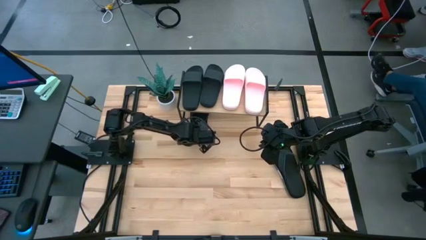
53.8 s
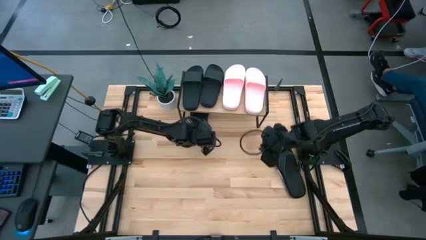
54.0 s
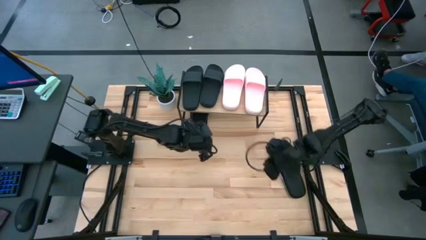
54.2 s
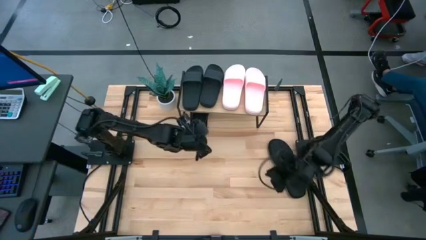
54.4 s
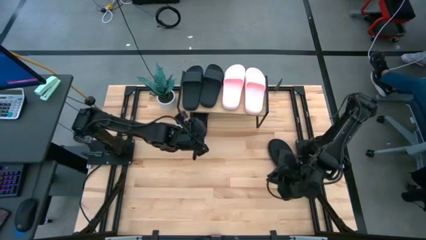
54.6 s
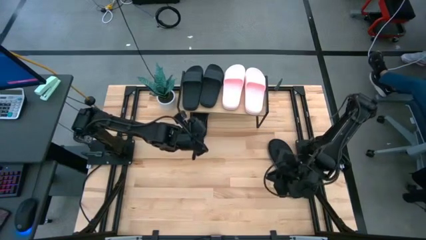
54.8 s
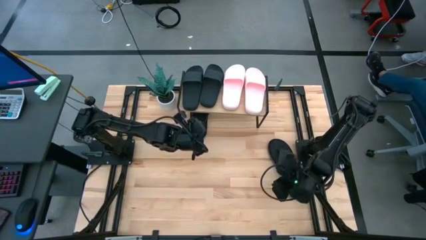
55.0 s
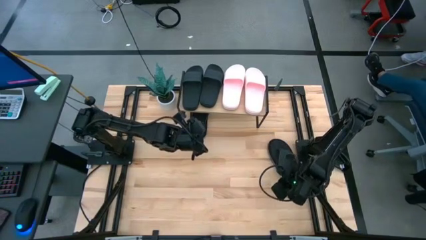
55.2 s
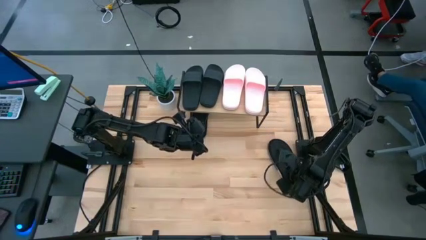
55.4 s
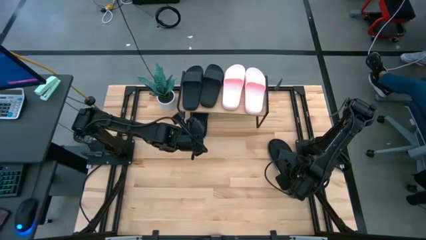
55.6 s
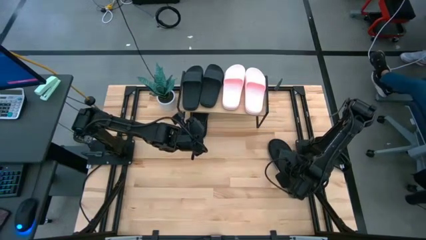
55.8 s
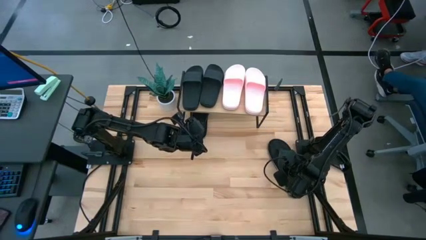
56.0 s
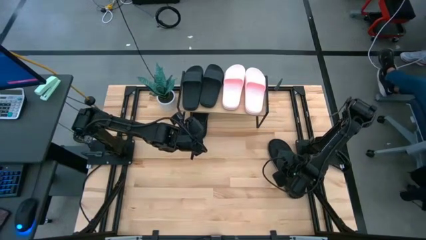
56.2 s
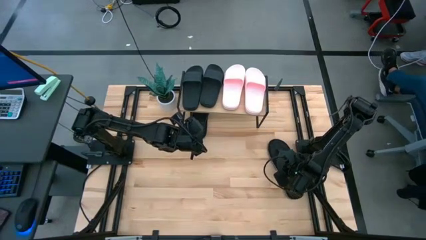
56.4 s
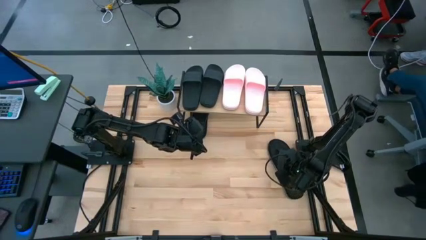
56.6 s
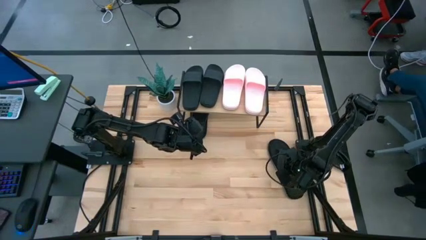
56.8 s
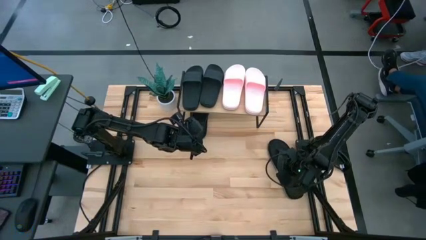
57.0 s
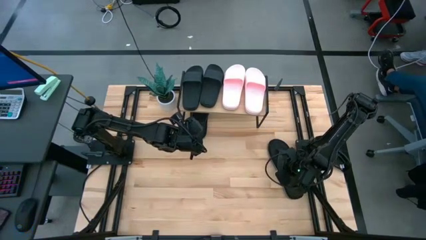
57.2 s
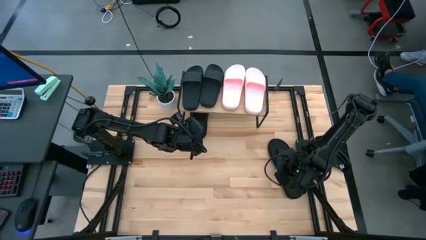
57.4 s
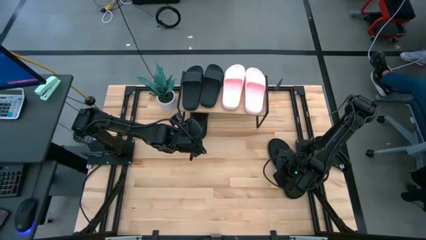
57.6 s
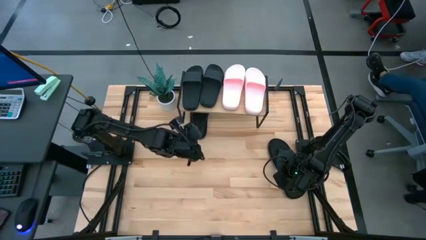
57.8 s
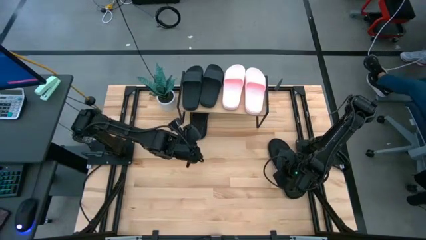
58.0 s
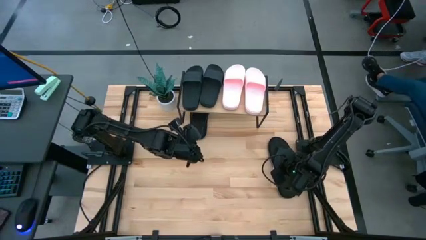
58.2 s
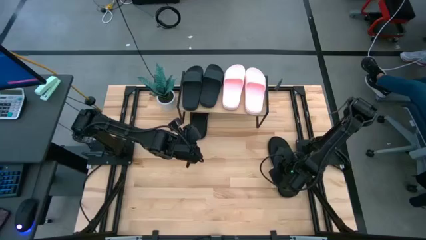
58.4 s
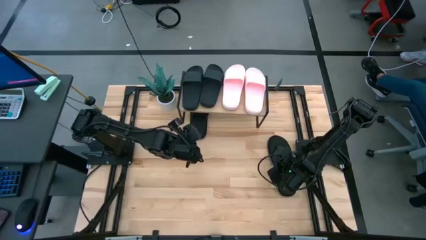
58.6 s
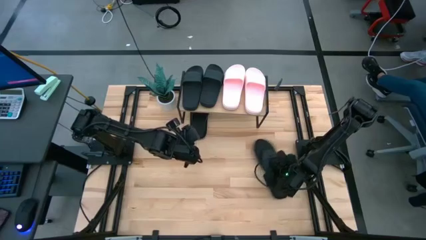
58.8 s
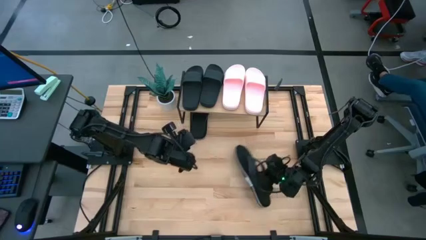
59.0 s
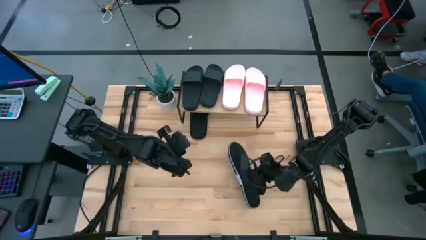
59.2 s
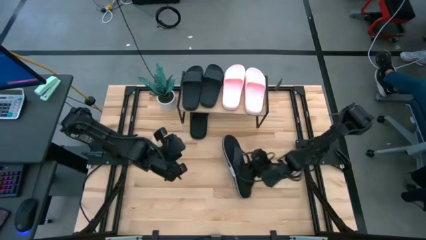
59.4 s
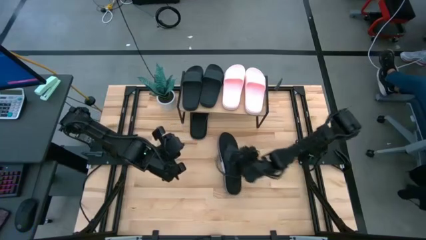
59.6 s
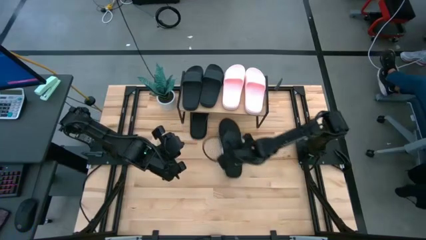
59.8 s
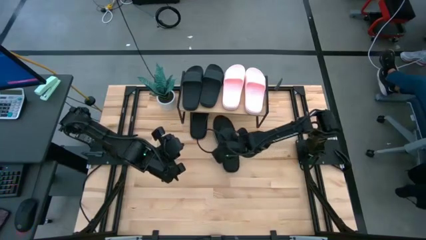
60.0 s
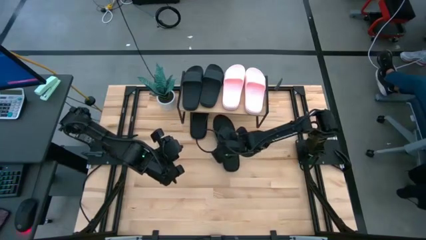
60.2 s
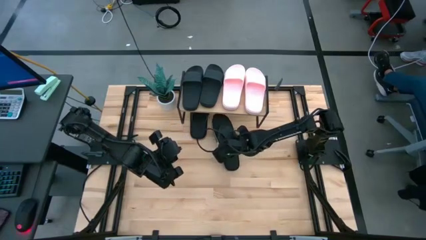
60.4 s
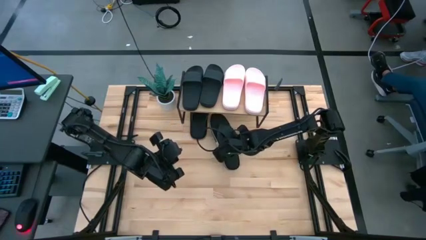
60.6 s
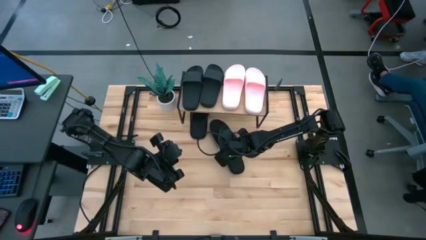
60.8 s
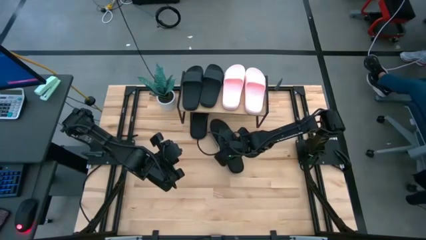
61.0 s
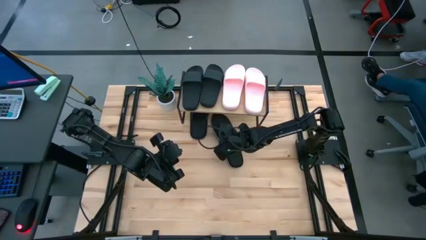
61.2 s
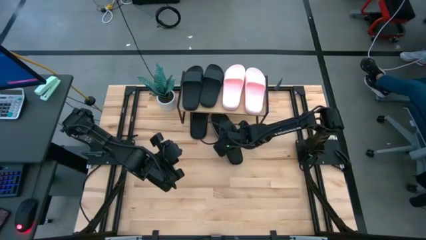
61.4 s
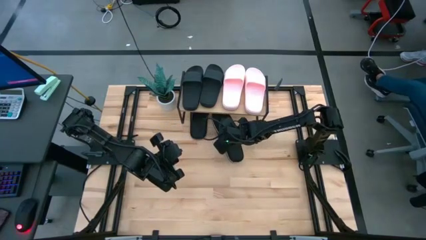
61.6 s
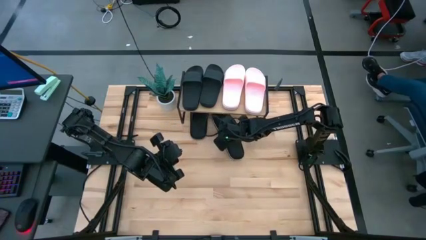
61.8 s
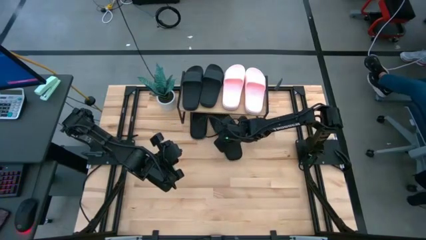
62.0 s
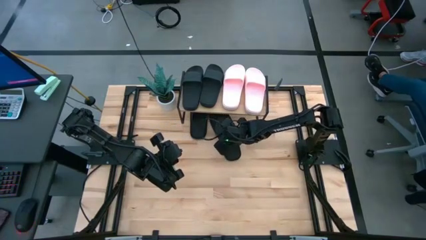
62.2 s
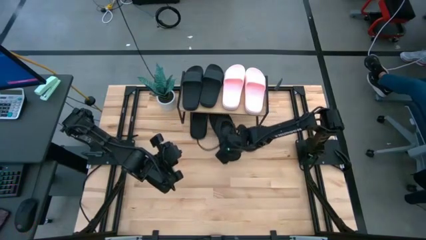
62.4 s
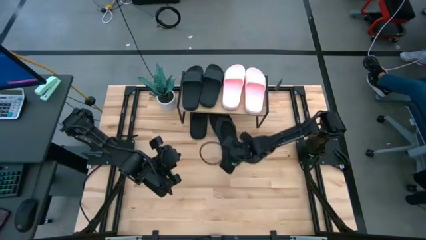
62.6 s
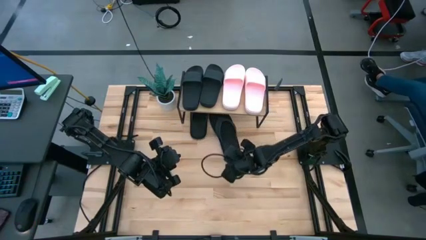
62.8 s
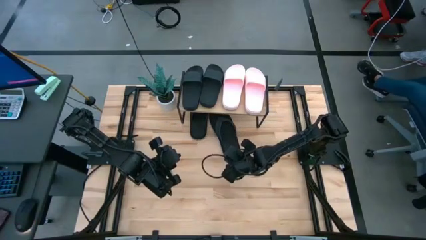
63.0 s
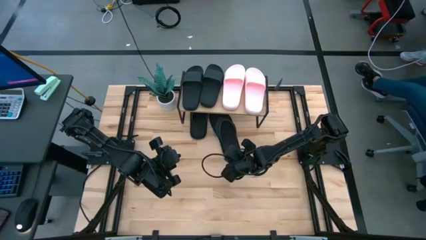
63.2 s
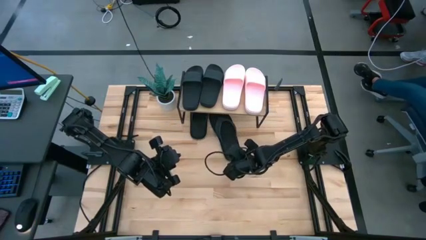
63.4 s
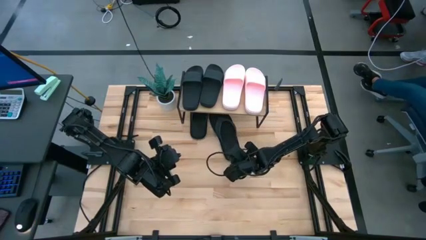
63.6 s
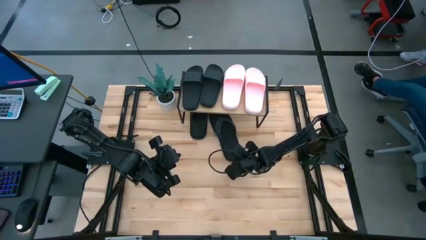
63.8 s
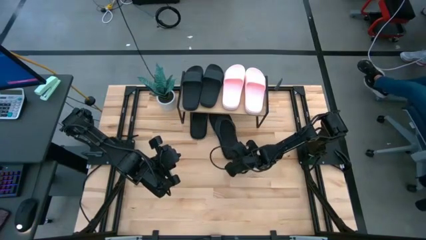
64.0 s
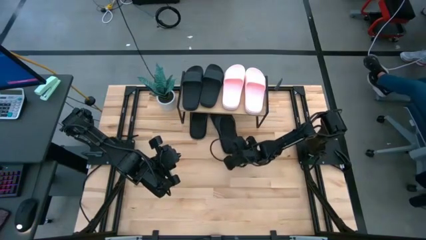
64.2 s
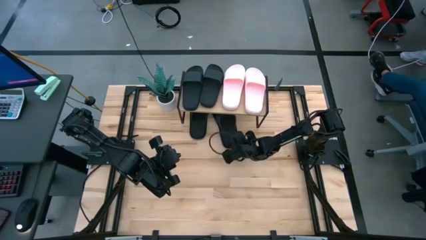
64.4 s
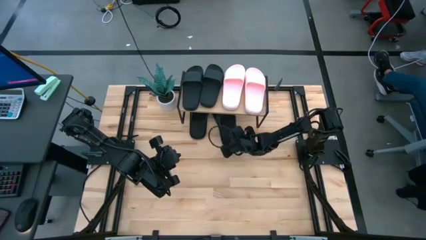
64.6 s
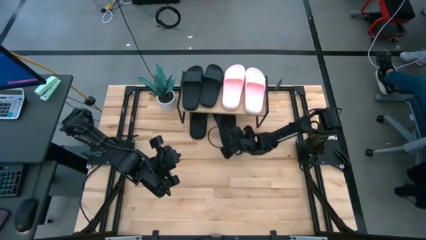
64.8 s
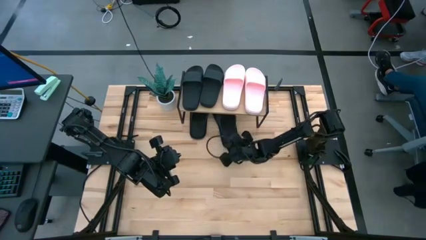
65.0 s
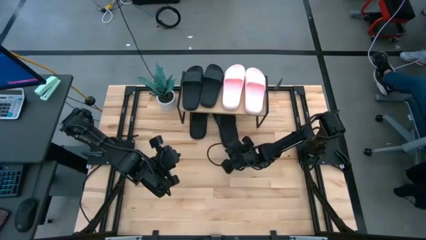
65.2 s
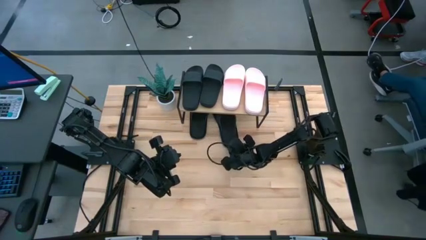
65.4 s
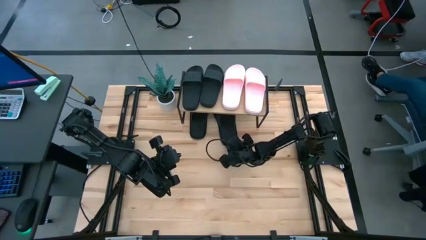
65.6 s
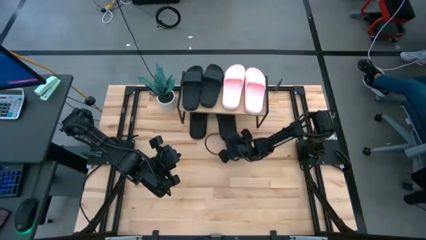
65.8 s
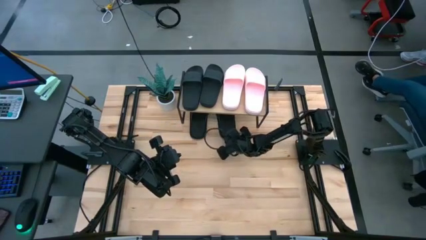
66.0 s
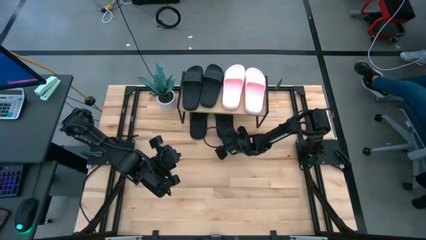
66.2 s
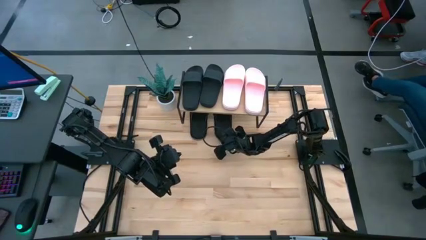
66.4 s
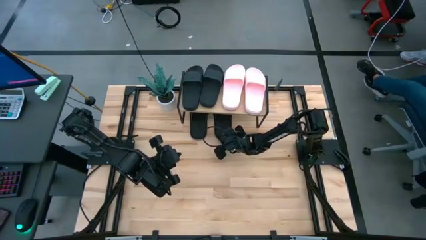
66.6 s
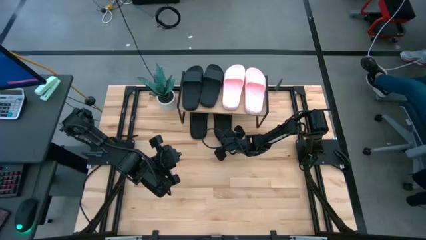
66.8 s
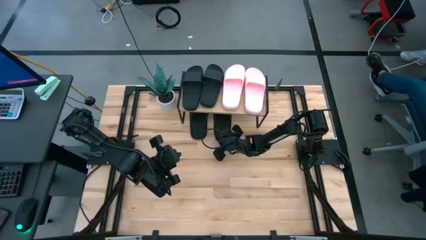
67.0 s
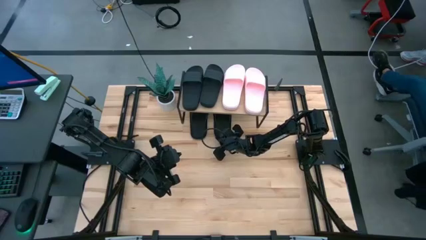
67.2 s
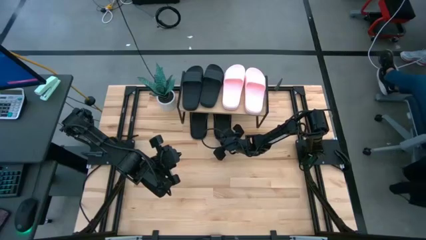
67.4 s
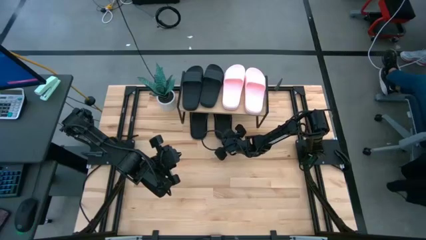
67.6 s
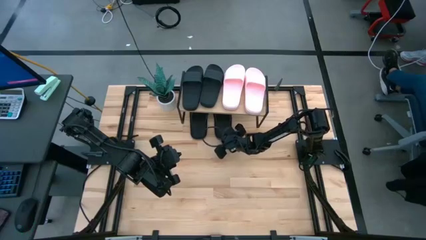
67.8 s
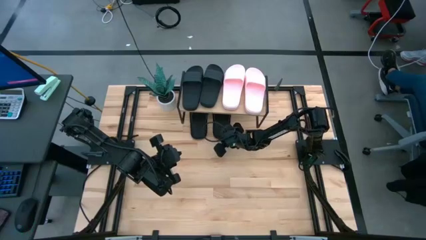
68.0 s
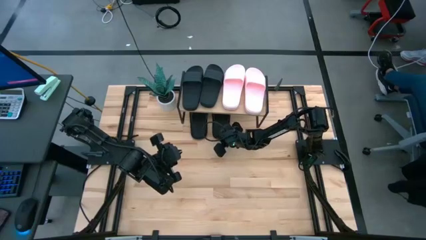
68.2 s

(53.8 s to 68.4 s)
Task: Pick and place slides into the shelf
Put the black slipper under the shelf
